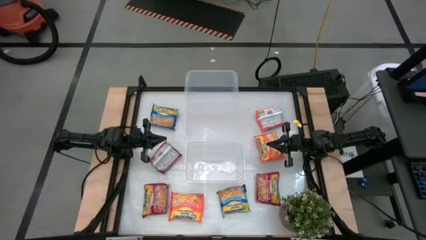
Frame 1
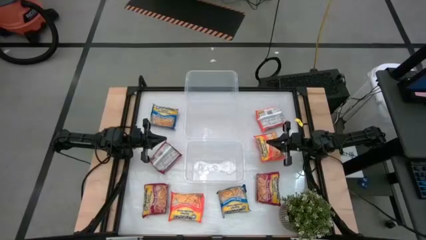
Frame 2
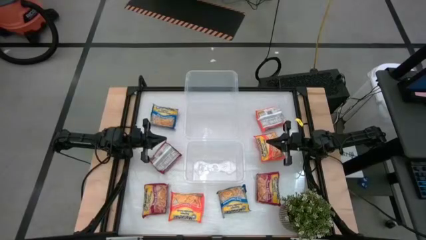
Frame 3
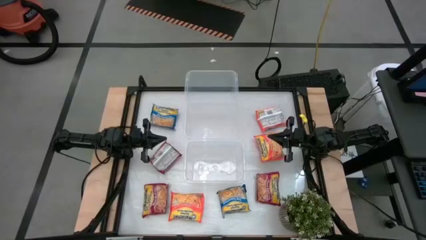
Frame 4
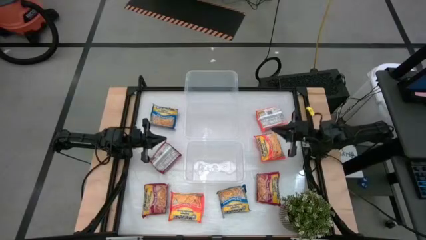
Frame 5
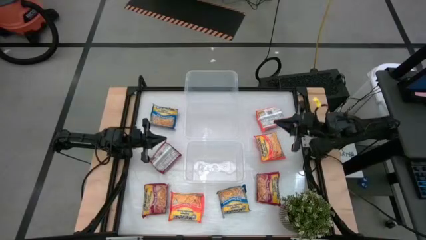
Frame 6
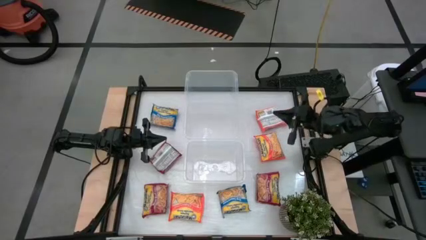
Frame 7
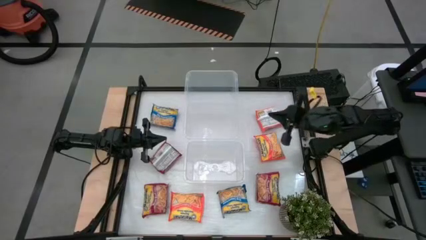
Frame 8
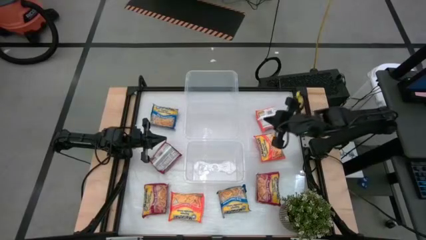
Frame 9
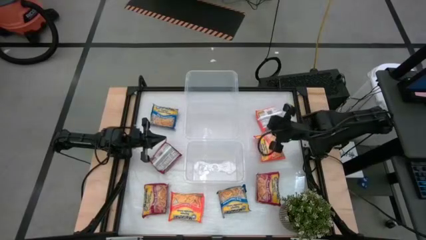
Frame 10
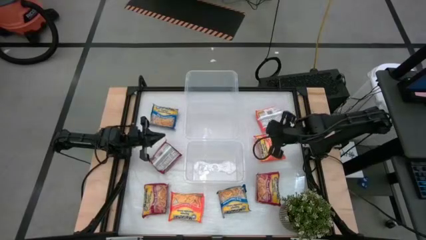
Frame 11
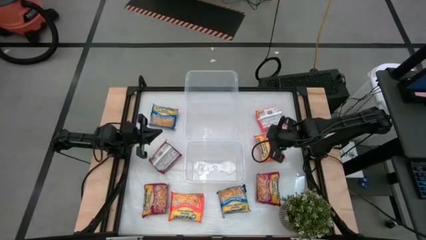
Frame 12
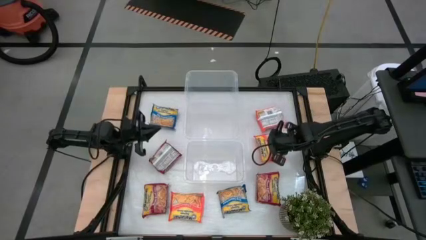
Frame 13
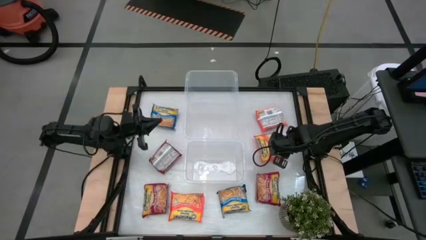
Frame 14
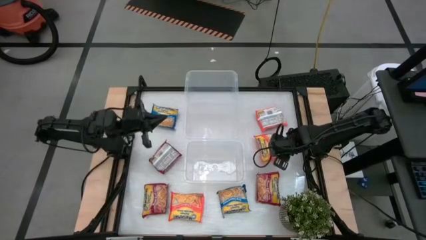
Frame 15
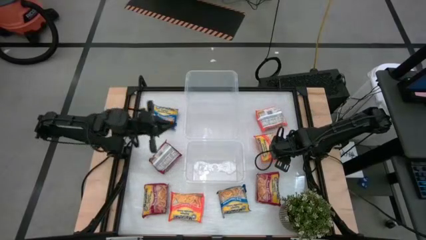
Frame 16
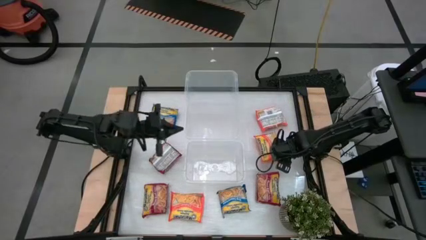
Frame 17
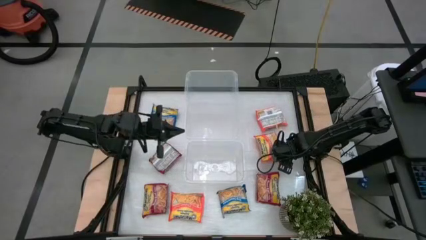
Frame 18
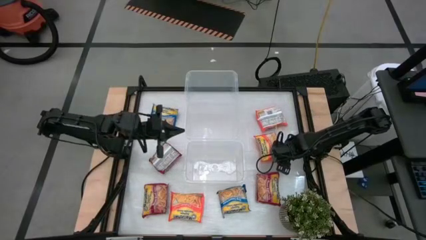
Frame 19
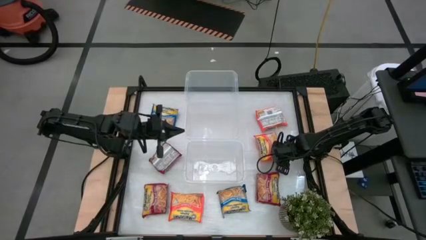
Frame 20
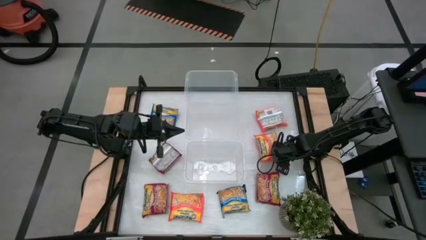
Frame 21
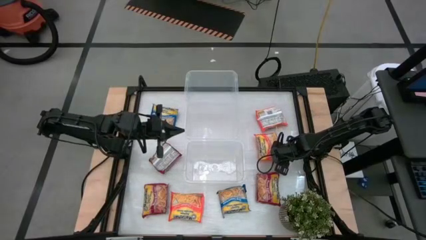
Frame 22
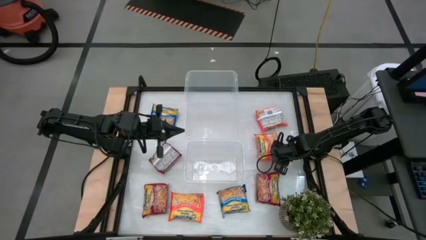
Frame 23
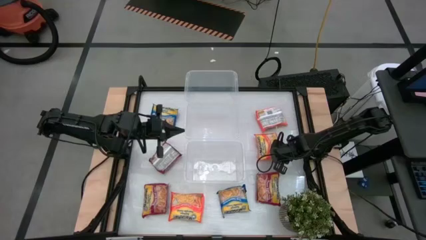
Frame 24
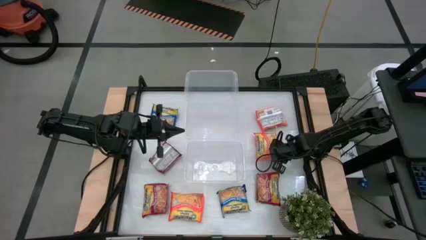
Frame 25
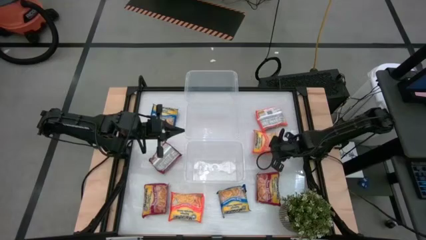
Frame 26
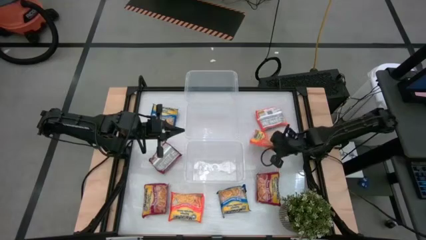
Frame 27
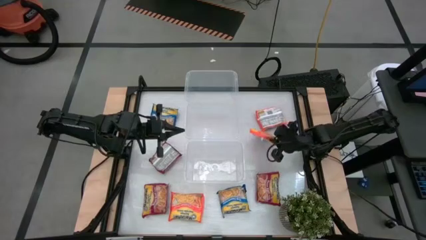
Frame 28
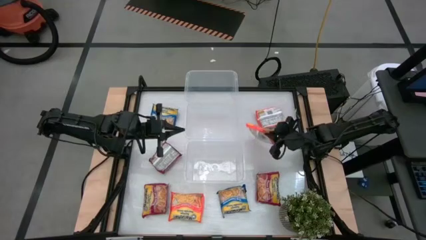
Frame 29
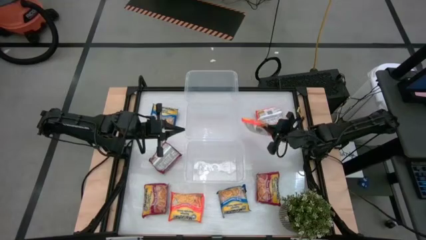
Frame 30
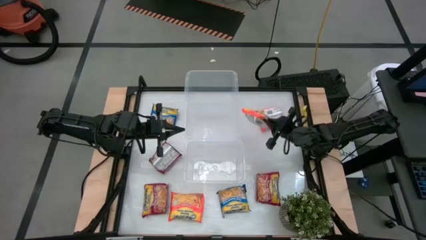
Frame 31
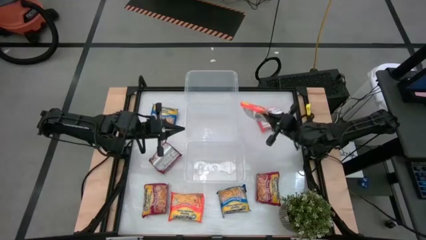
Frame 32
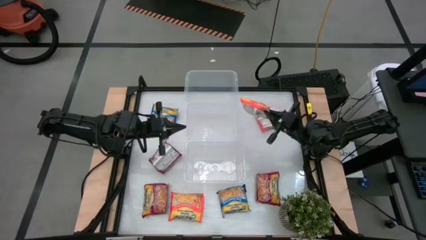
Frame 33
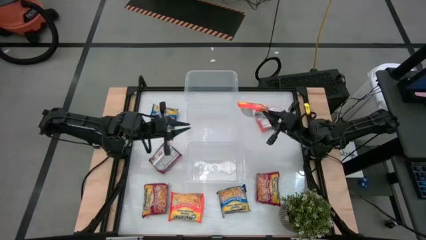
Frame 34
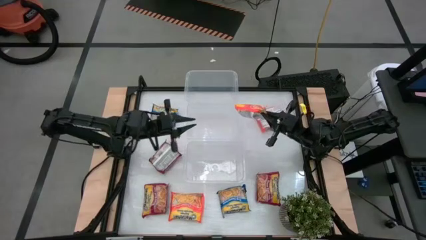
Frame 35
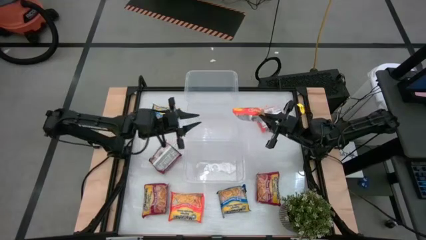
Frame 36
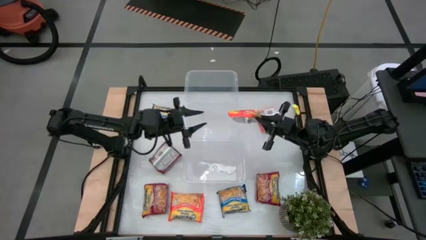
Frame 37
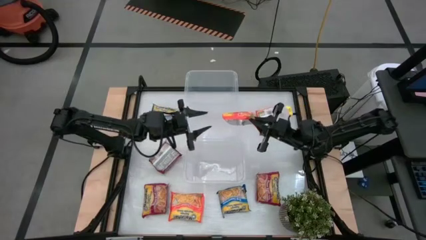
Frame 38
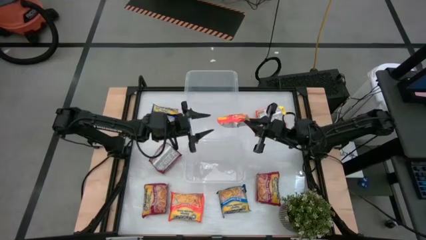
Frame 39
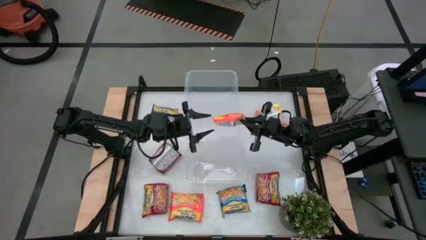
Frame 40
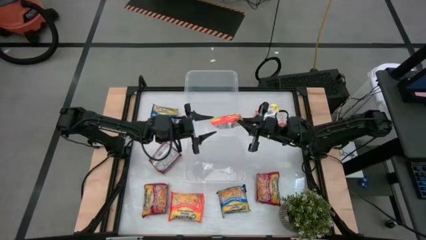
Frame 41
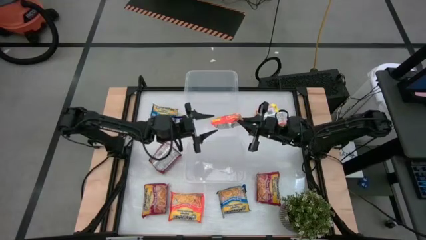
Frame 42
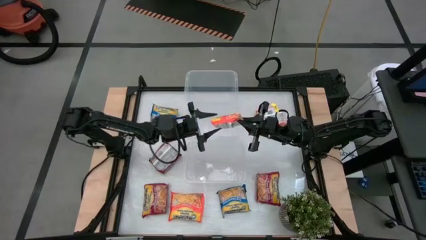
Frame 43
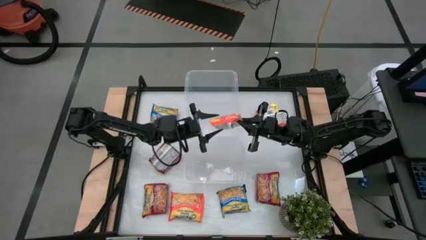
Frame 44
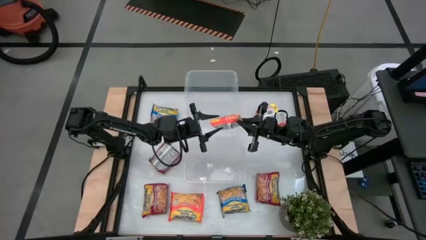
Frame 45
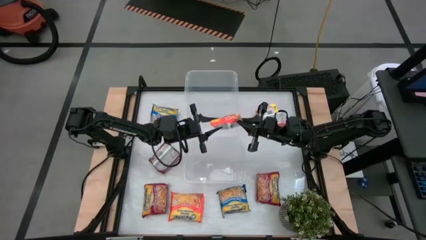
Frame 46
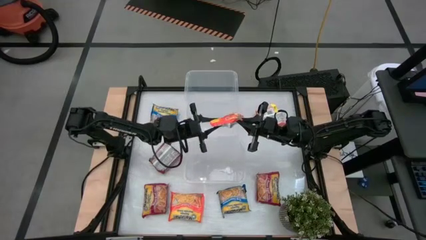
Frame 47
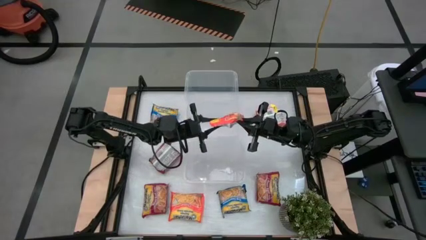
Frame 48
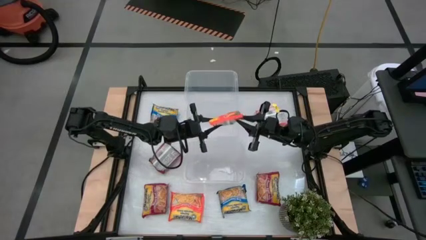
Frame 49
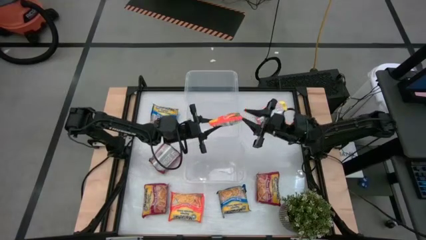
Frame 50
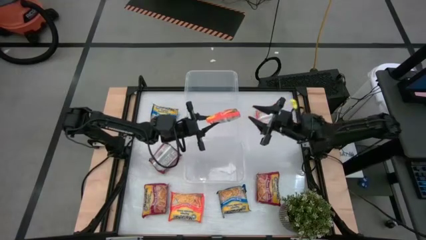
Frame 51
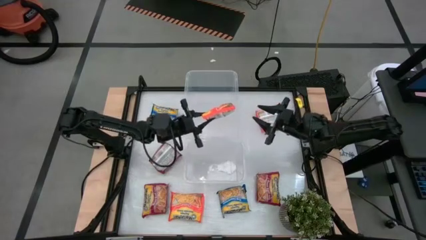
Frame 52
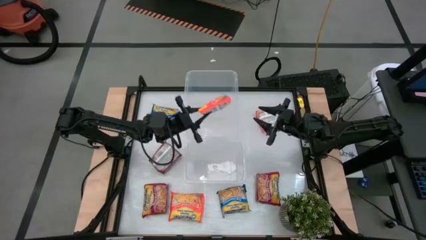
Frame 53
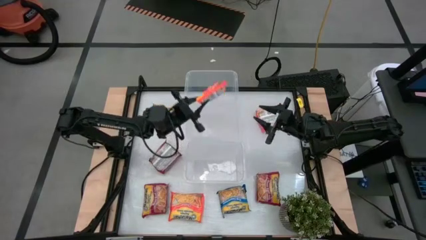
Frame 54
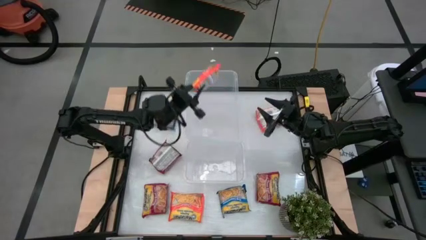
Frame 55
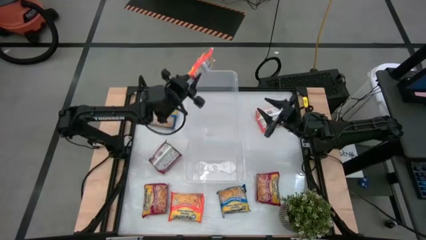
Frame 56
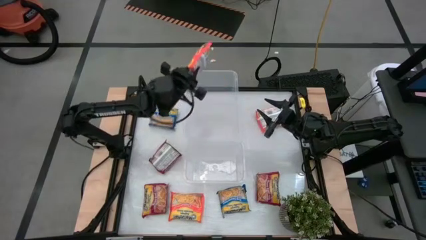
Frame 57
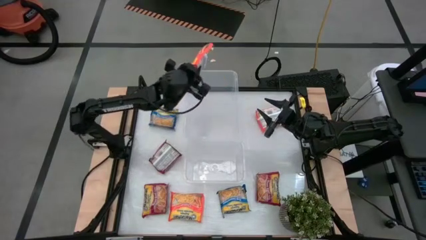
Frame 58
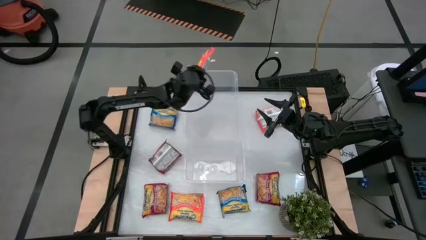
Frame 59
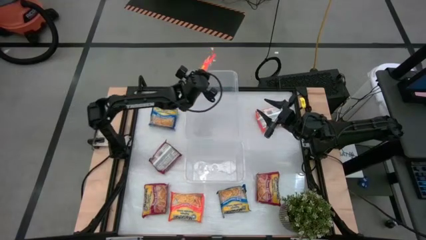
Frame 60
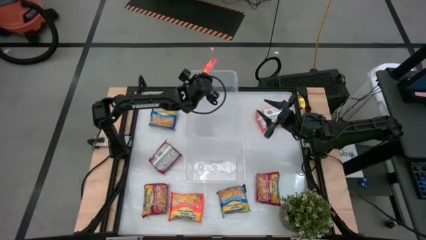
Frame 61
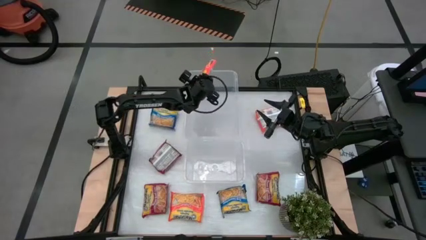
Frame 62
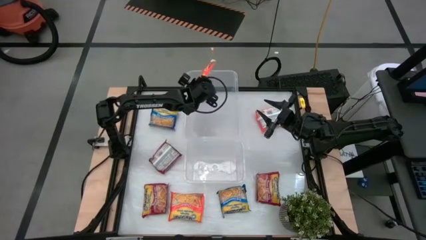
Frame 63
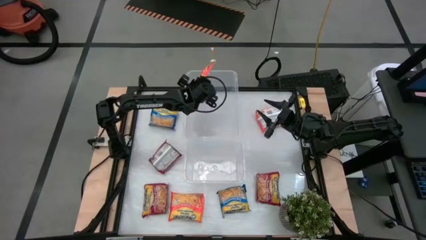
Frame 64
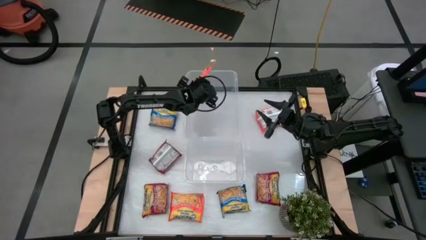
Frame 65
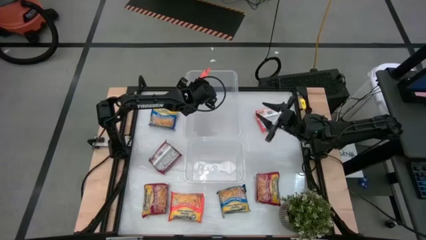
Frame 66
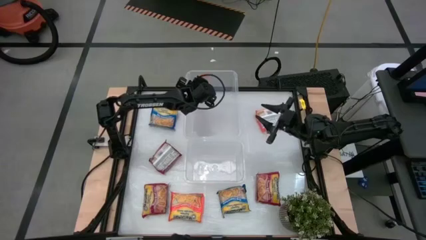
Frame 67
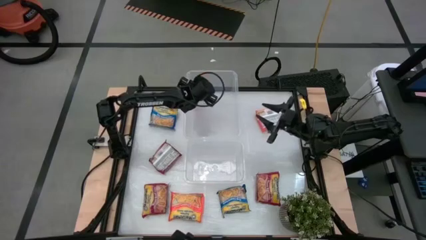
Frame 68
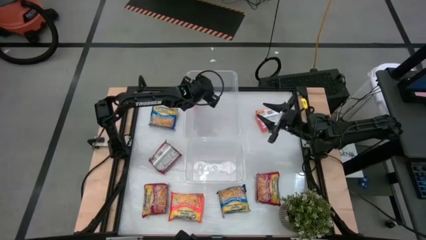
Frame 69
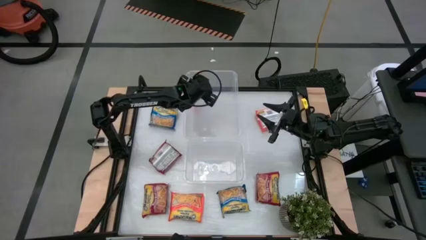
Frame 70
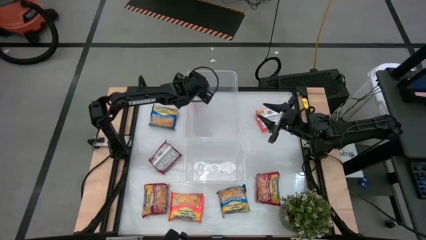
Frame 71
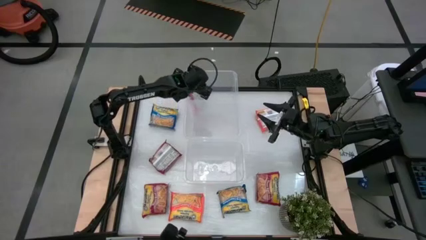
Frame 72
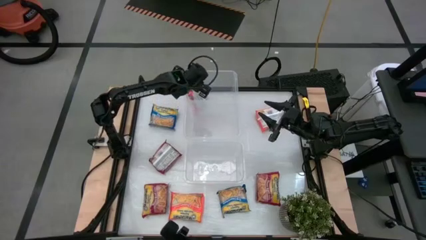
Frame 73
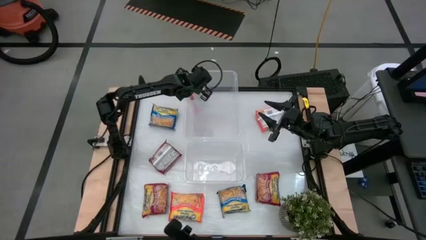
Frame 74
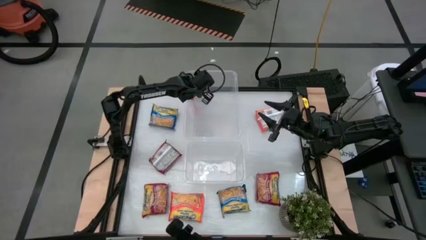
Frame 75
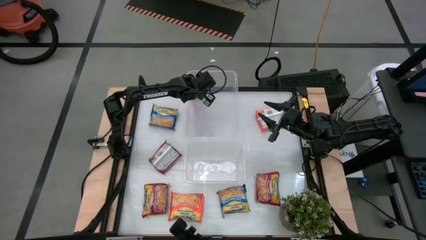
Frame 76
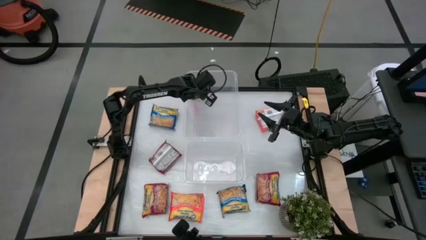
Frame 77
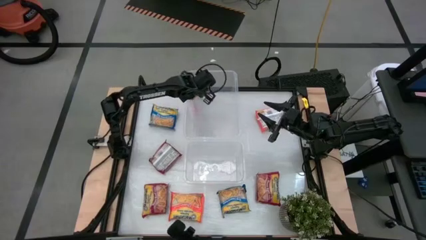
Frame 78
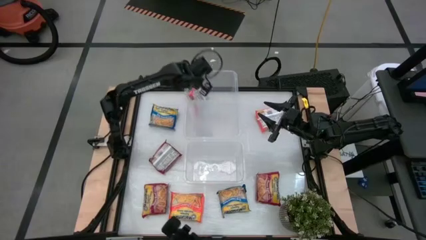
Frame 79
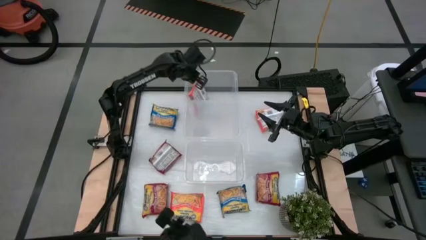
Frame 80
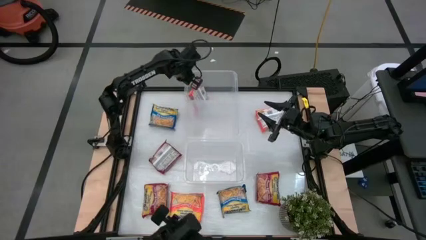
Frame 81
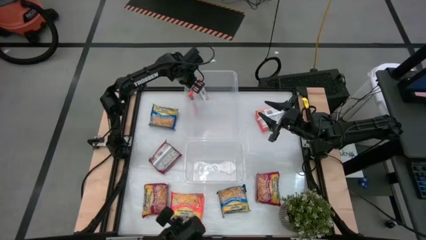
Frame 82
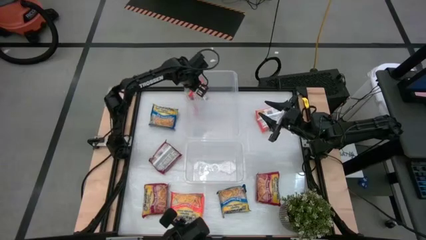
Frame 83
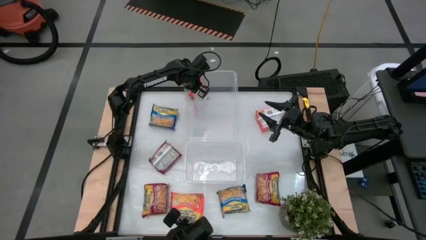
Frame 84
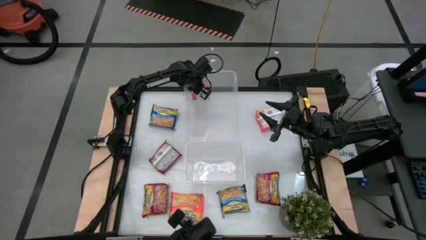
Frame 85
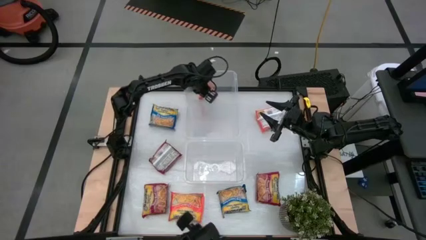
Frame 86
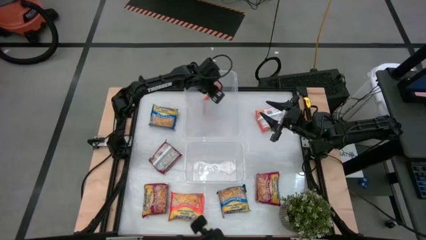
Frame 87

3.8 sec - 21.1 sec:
Task: Sort Maruchan noodles
Put the middle orange noodle pack into the top transparent bin
